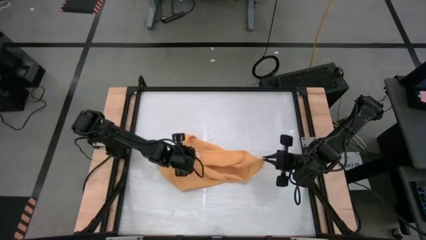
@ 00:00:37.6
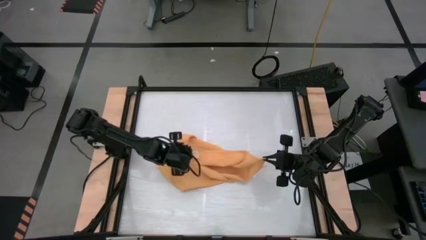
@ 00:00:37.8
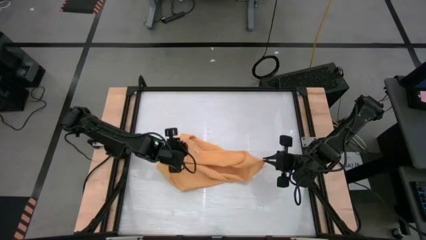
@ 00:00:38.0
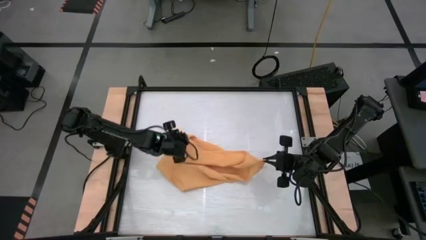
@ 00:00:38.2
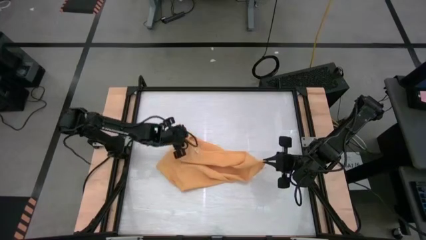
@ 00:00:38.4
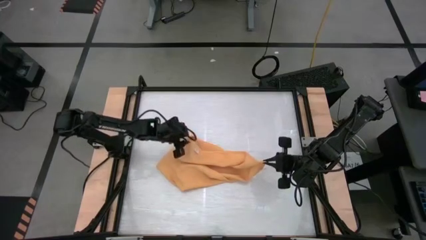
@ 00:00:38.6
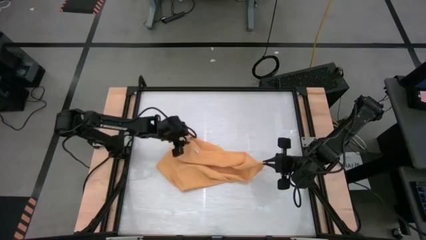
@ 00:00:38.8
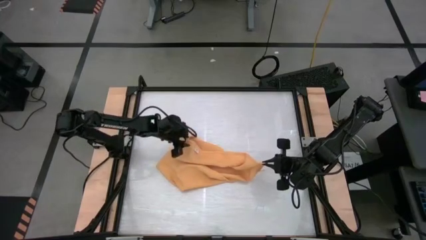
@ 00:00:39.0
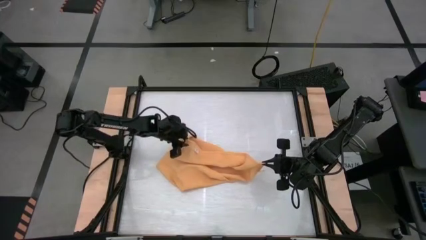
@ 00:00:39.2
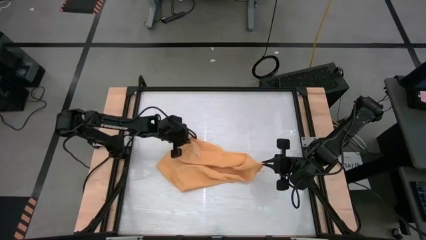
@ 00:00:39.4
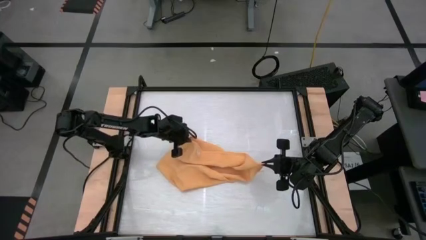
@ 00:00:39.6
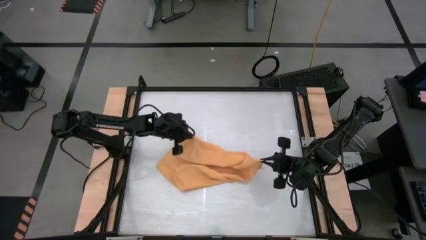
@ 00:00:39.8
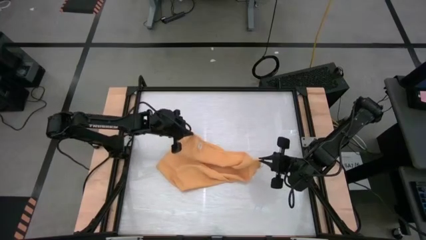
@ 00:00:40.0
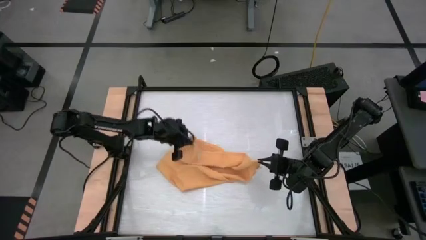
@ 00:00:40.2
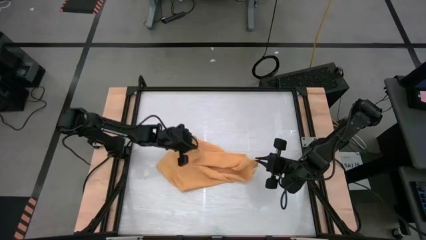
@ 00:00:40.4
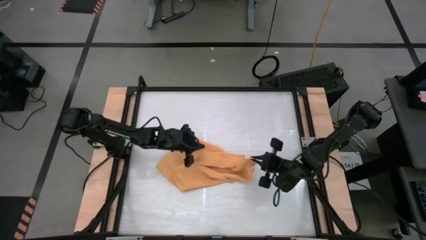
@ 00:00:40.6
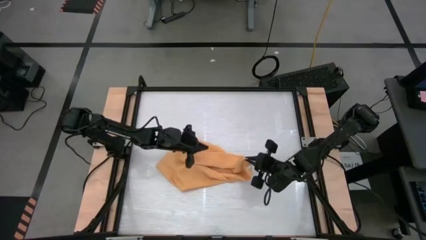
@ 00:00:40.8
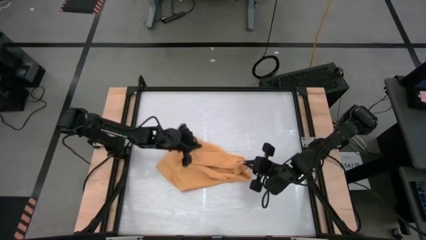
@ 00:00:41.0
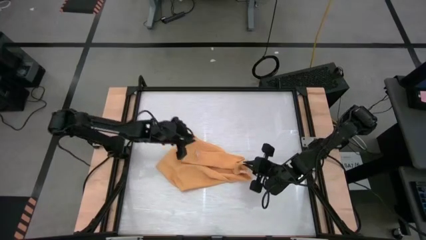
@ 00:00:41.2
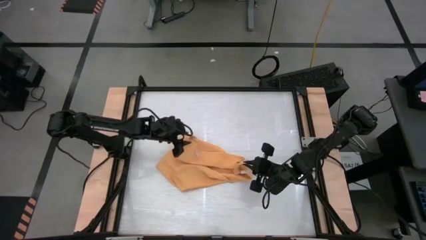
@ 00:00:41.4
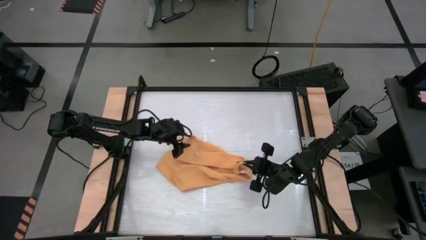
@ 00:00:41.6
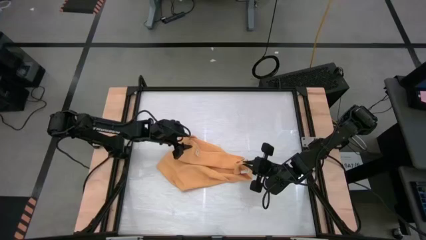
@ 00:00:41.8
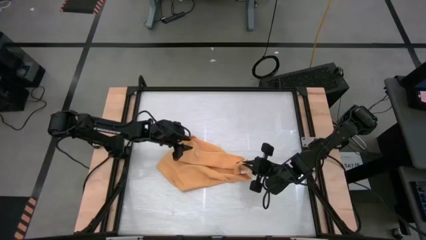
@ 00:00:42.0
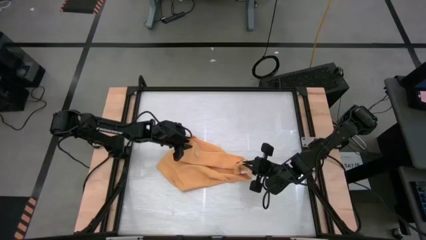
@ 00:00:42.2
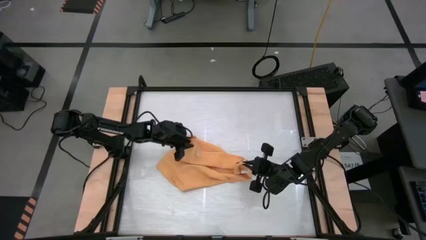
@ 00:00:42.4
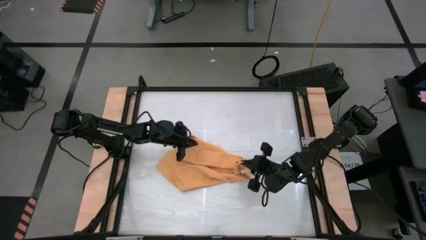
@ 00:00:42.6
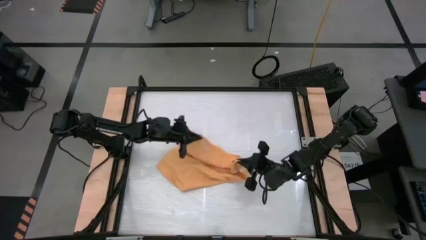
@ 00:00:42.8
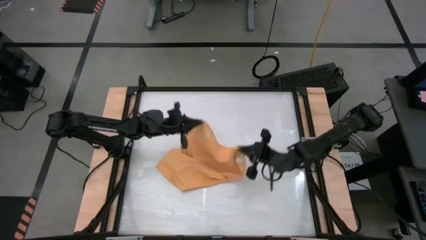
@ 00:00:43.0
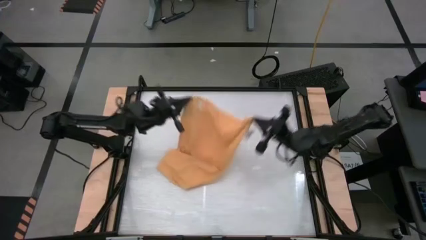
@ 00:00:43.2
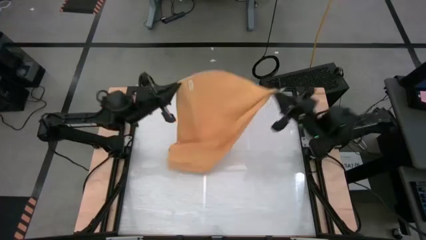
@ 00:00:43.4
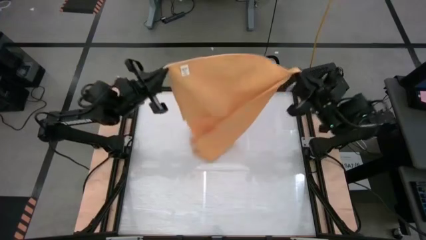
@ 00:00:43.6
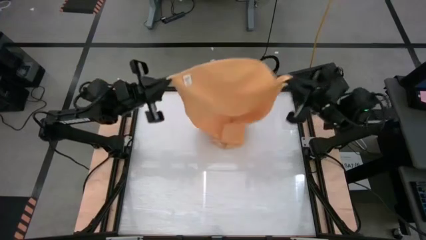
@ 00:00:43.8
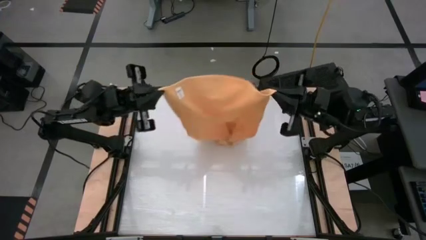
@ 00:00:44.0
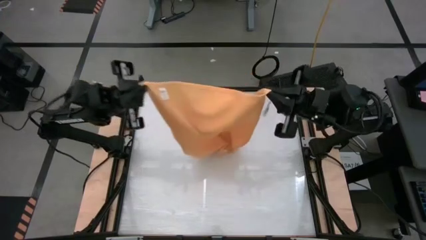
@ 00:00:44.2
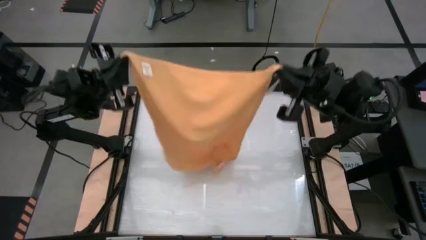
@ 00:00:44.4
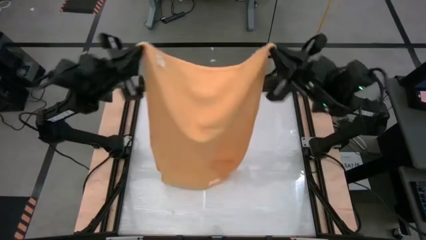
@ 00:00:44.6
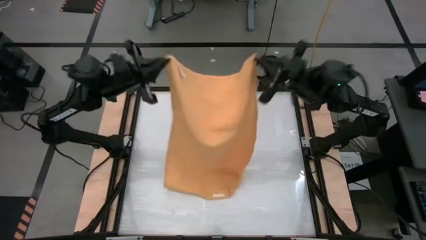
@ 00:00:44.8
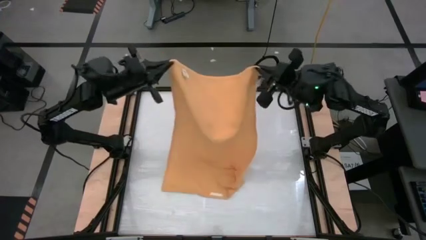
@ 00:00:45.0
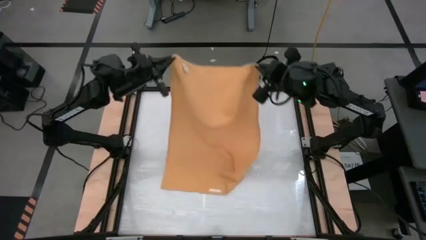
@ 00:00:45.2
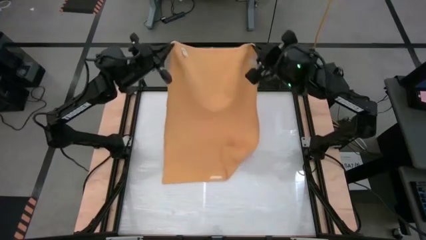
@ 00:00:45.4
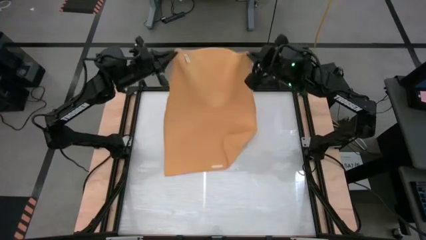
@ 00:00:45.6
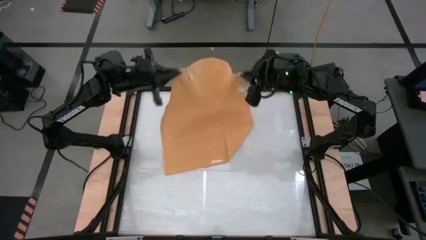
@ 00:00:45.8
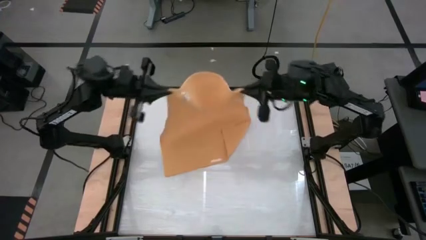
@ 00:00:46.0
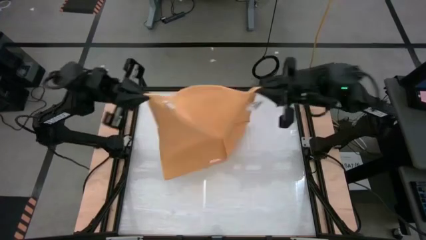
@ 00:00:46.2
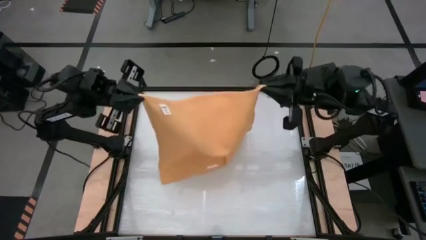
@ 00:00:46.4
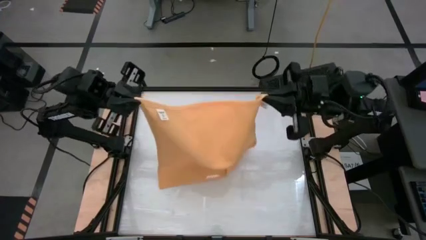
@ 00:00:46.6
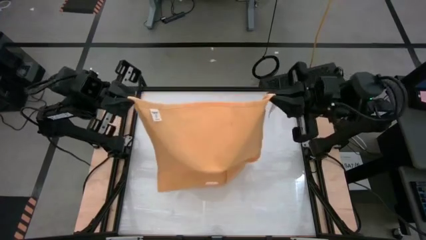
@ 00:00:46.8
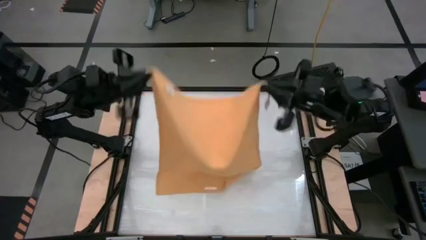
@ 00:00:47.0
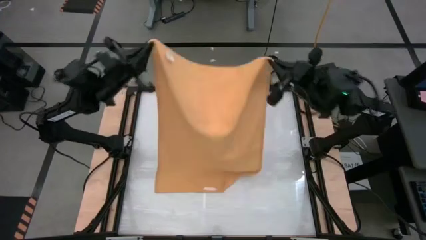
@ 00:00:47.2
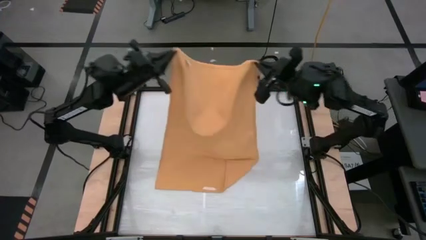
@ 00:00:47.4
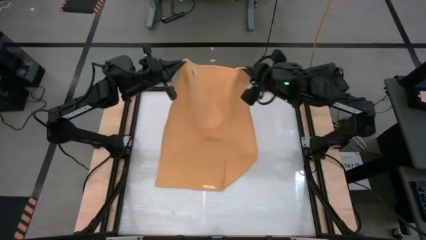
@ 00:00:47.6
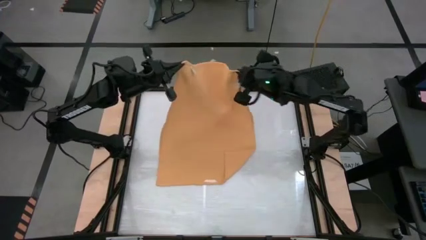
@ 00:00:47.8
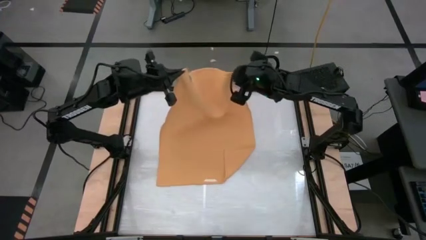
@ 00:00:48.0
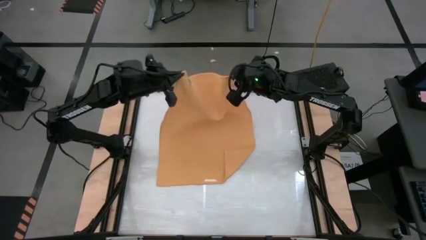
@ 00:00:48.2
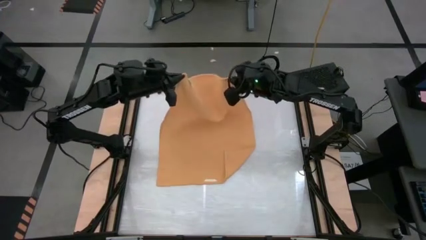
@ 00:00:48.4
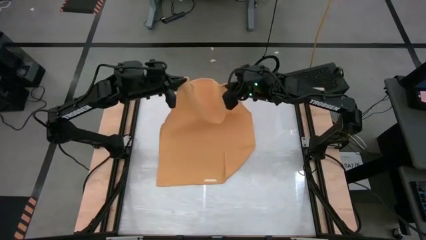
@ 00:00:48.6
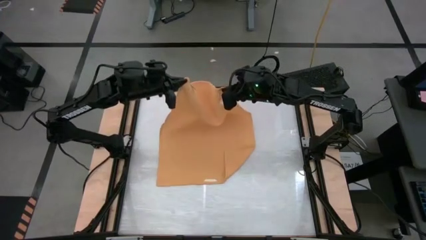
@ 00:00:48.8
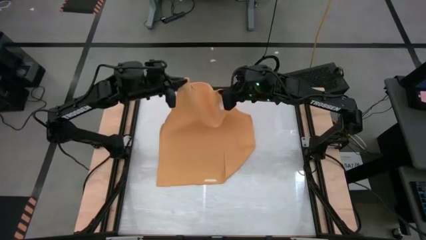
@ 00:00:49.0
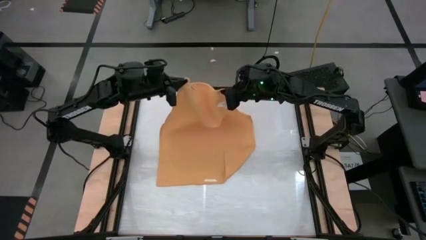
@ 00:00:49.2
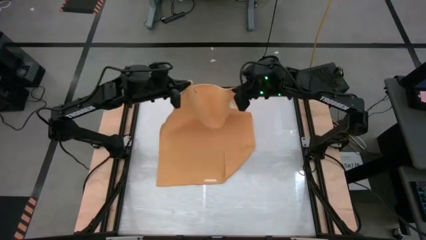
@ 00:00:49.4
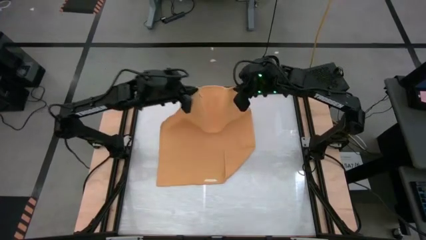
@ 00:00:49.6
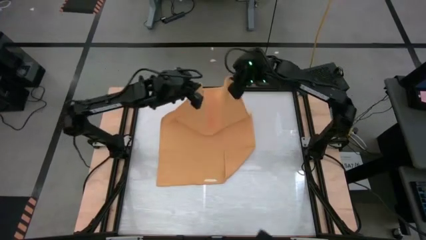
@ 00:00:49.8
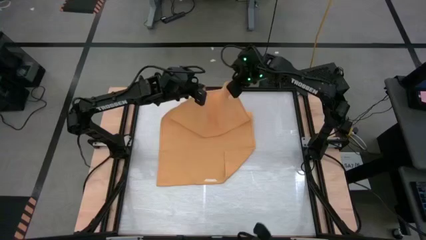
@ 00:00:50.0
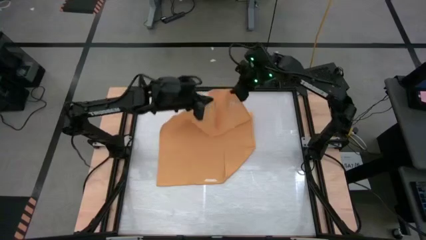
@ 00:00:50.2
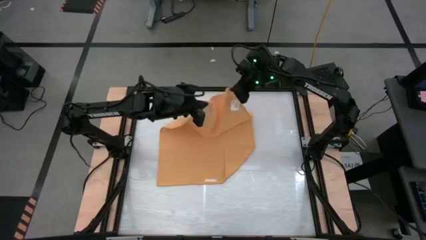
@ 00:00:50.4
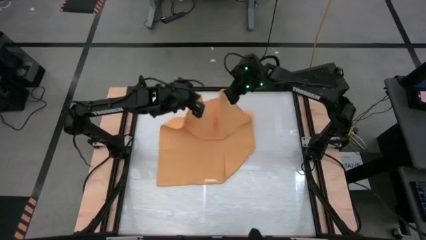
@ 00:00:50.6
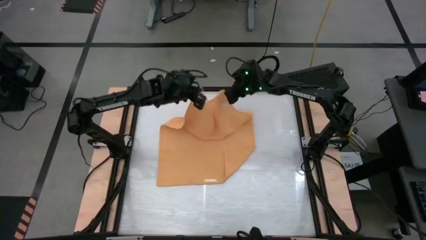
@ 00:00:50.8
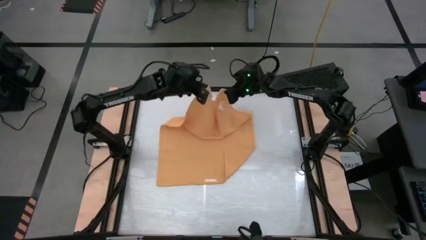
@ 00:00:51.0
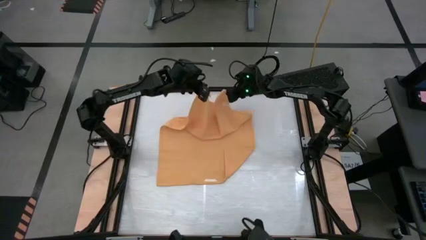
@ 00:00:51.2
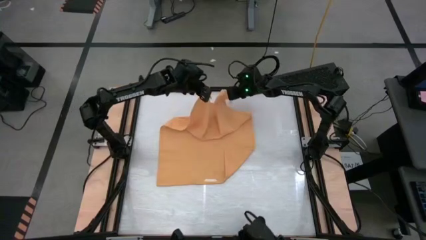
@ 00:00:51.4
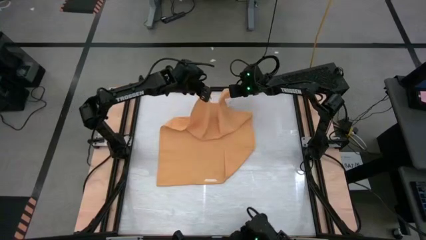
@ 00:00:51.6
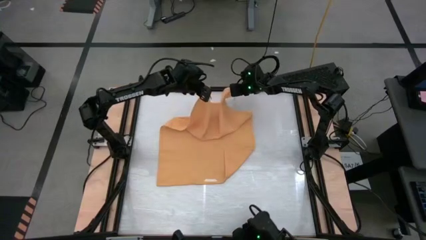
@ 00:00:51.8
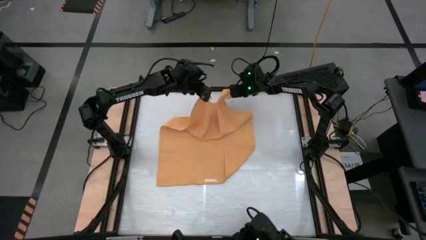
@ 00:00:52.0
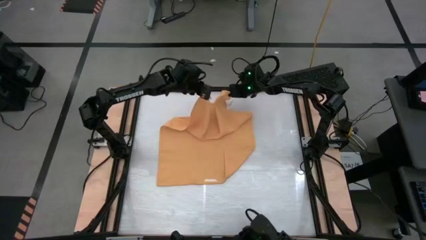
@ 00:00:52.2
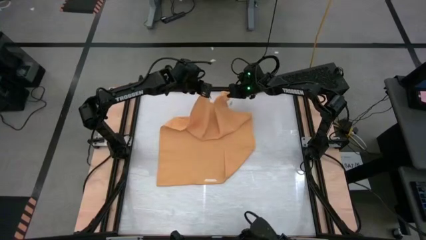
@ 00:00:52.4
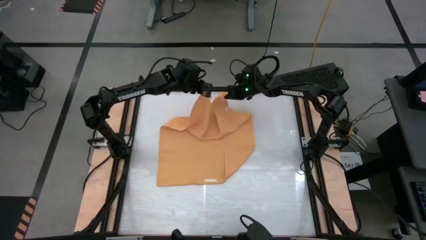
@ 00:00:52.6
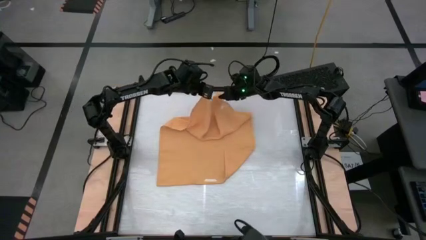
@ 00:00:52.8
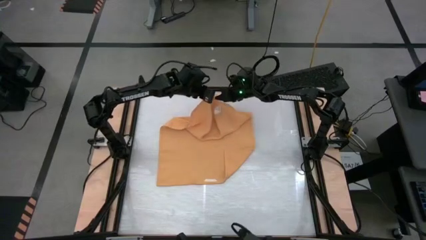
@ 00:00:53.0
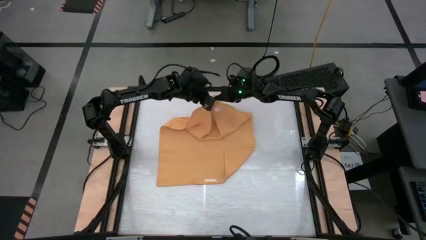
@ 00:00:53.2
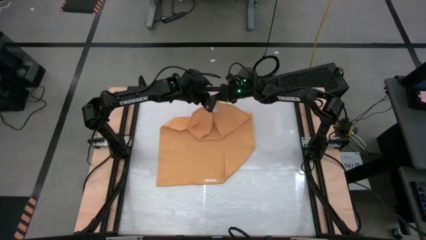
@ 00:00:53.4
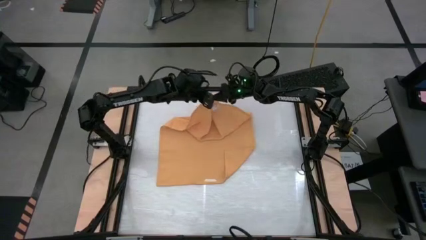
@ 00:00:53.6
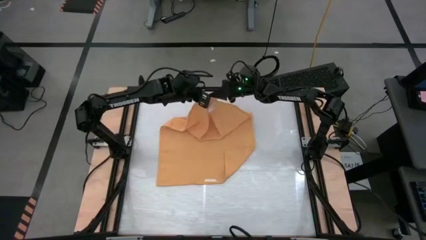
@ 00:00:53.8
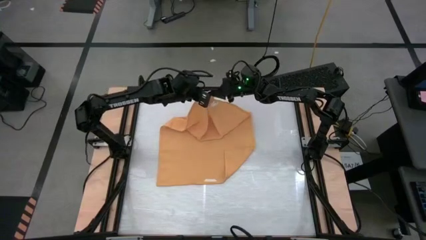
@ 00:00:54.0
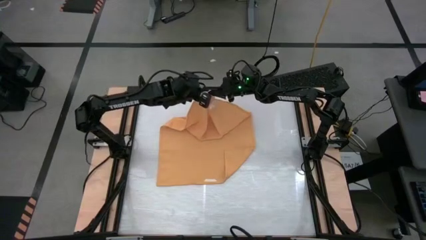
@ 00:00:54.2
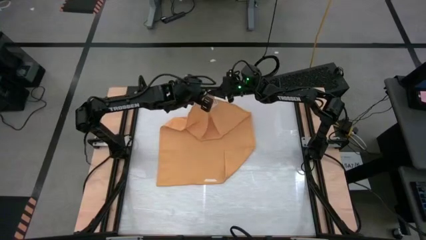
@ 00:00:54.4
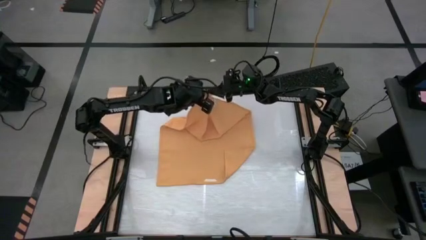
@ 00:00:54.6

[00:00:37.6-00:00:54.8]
Task: Roll towel into tight, uniform cylinder
Roll the yellow towel
